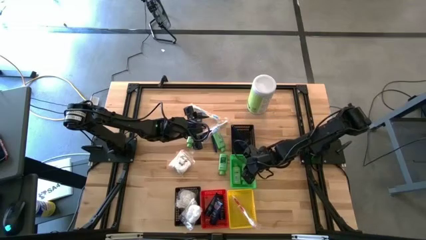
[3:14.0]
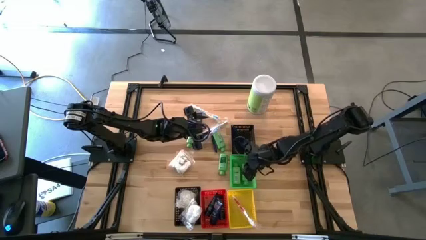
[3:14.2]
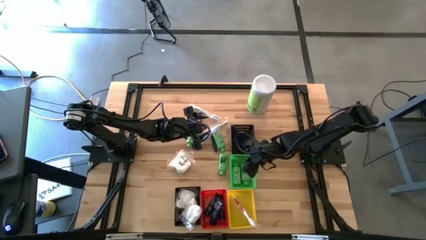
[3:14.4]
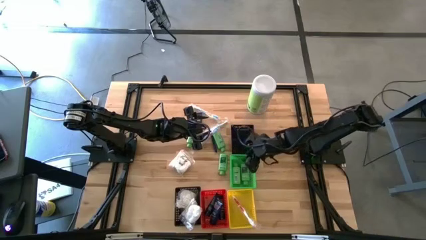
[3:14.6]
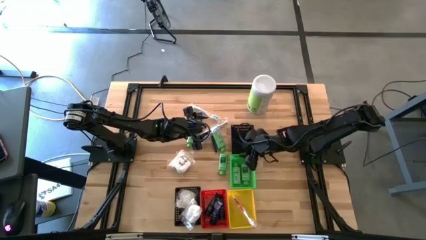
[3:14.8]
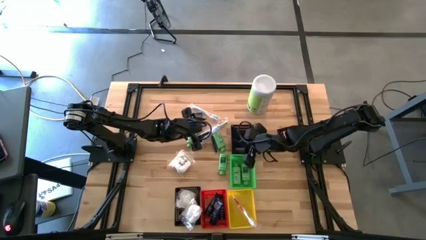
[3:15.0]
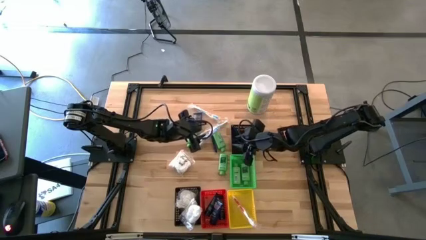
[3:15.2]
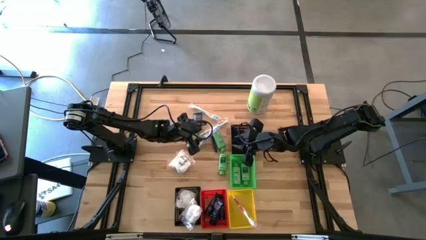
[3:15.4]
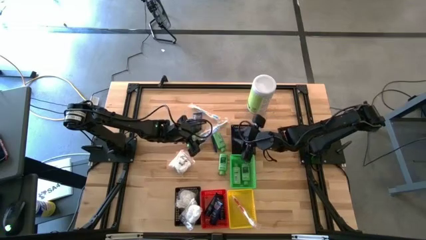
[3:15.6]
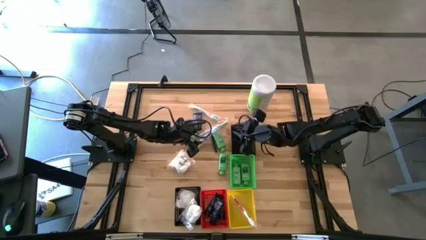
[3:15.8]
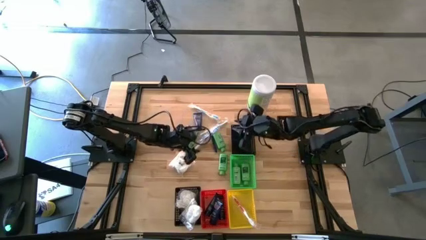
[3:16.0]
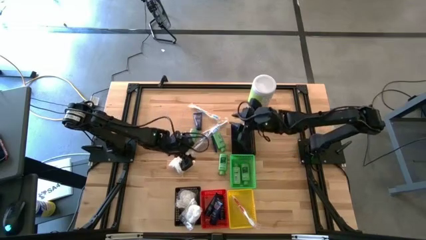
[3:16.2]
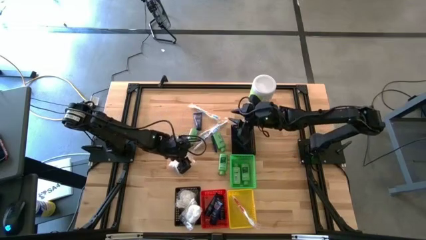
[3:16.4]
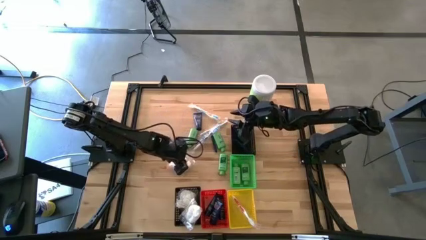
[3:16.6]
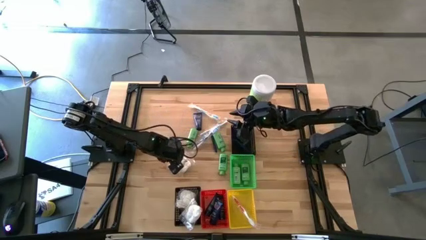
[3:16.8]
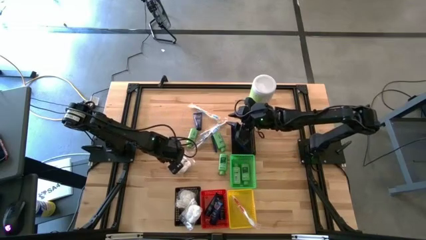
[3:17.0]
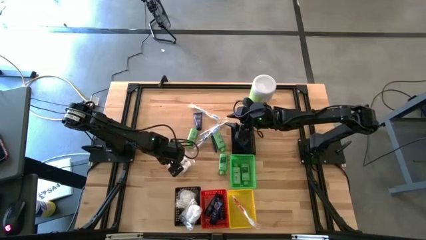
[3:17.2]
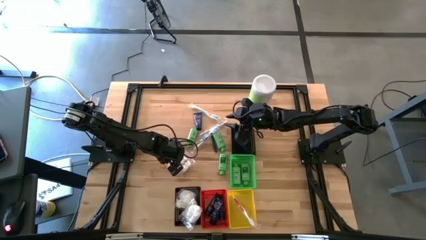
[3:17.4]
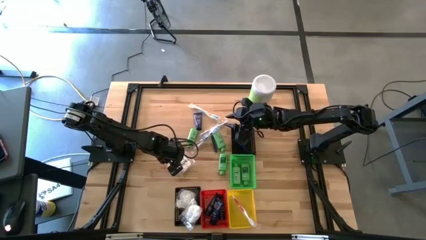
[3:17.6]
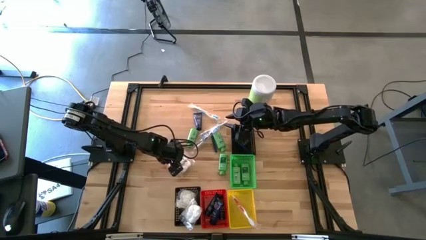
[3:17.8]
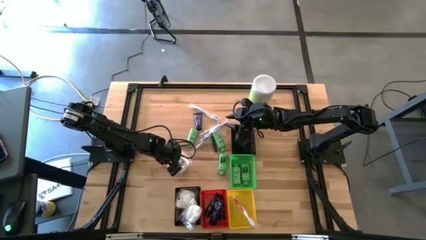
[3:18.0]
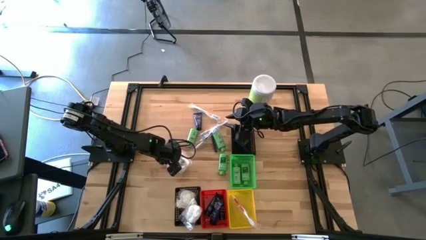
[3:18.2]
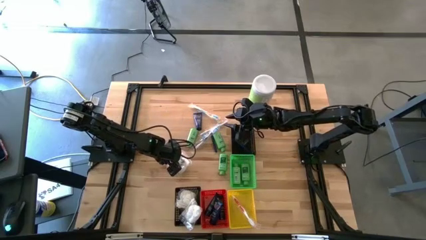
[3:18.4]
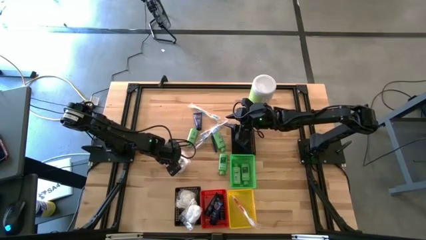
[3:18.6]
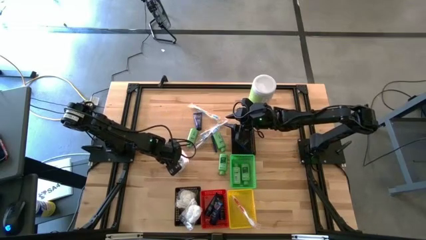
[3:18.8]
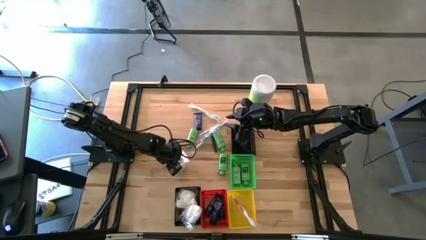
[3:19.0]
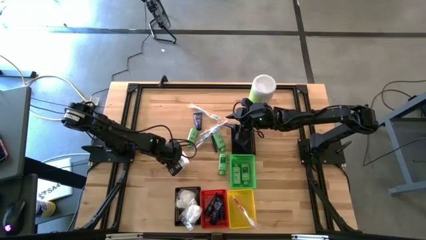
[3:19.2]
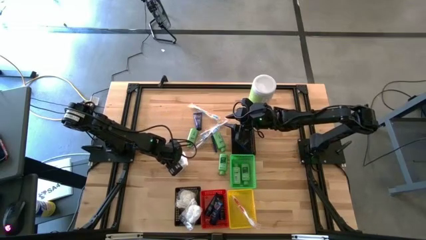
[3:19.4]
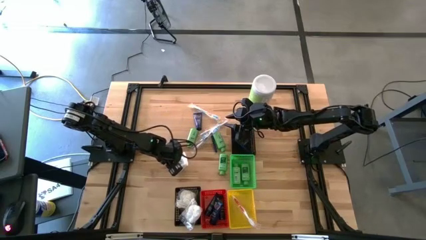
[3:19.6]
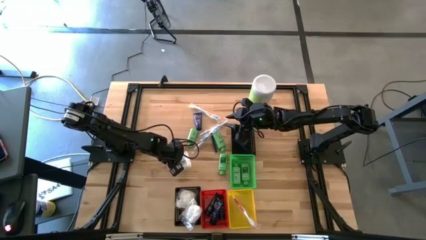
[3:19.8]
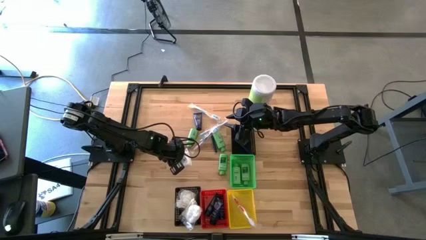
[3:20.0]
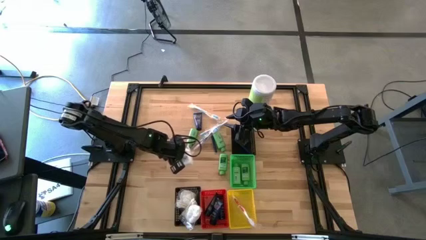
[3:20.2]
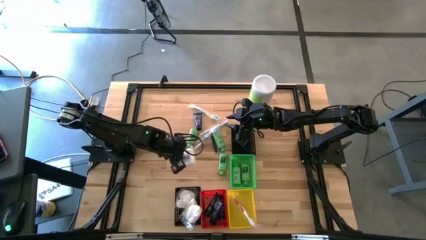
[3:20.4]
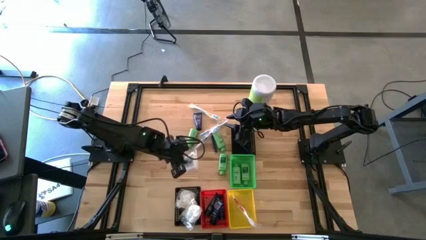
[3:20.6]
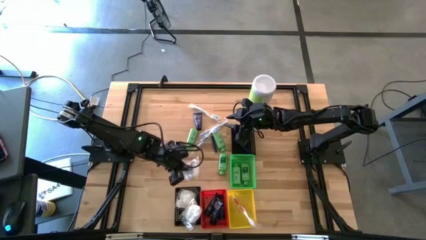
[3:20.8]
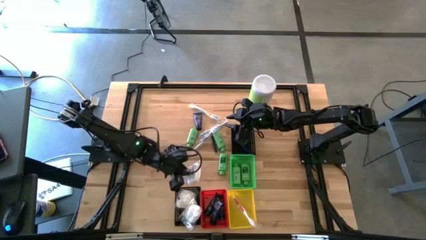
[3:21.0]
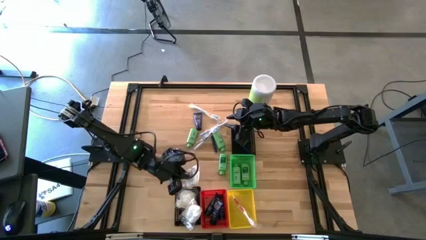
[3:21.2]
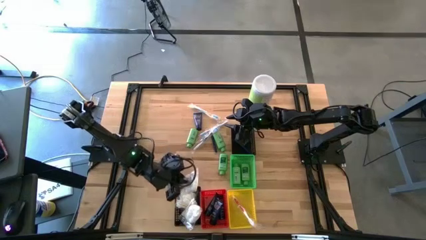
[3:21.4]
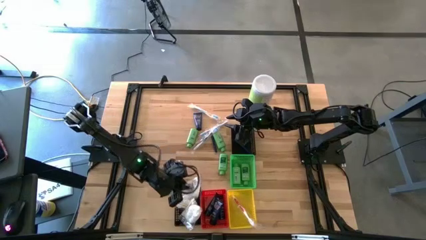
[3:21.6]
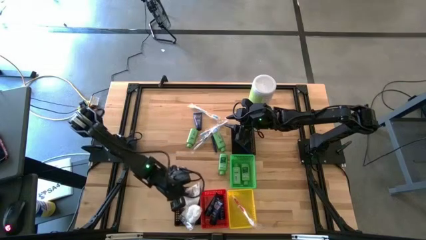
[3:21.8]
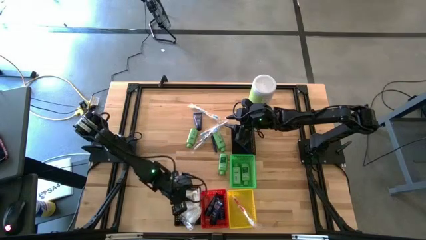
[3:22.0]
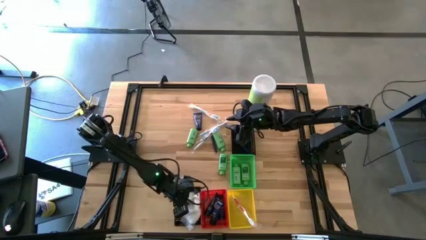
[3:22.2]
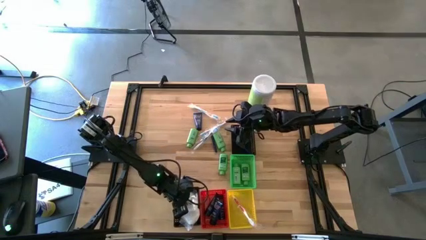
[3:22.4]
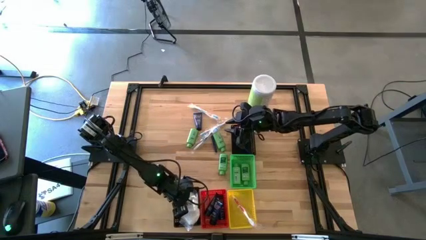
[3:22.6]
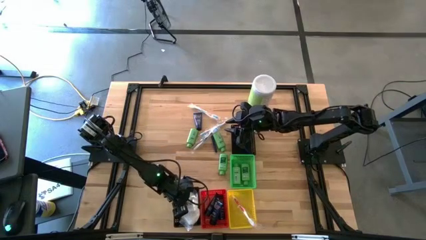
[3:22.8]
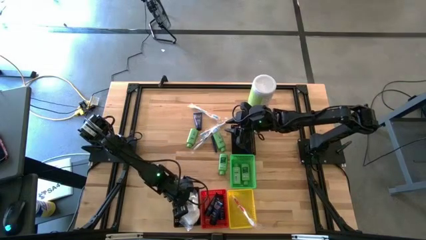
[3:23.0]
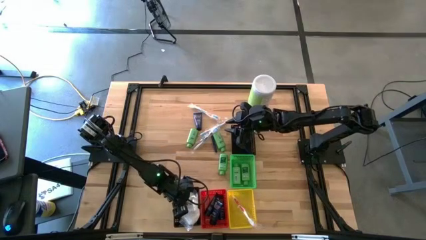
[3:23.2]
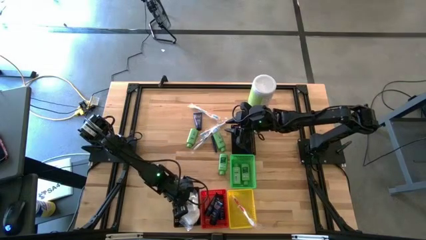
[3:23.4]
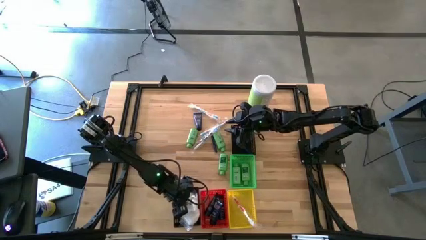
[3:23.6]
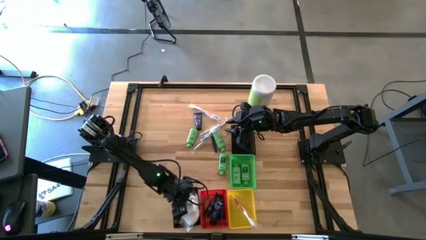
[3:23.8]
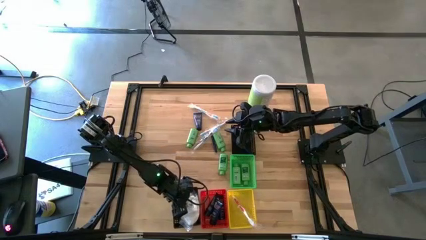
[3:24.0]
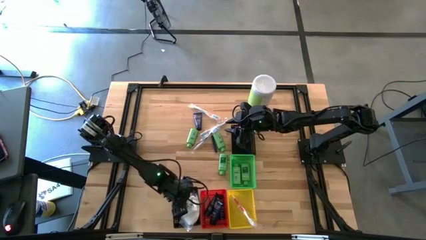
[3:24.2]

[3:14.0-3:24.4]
Task: Pick & Place Travel size toiletries
Put the white cotton pack into the bottom black bin

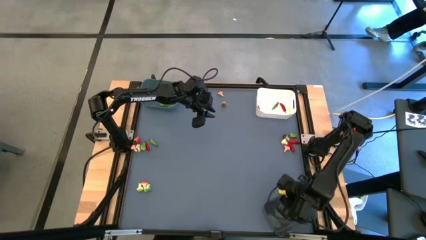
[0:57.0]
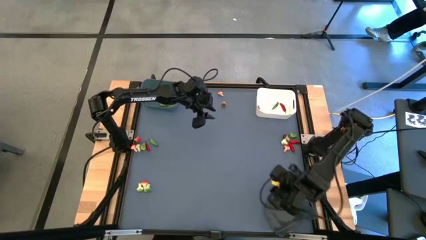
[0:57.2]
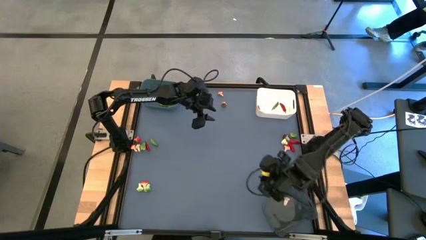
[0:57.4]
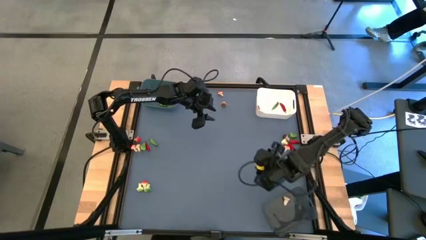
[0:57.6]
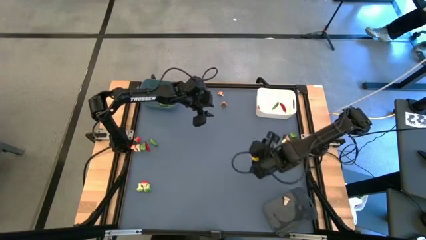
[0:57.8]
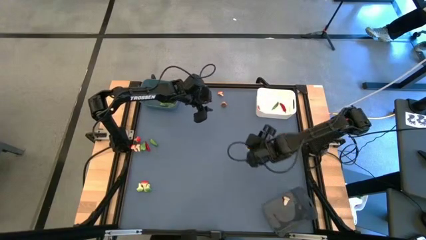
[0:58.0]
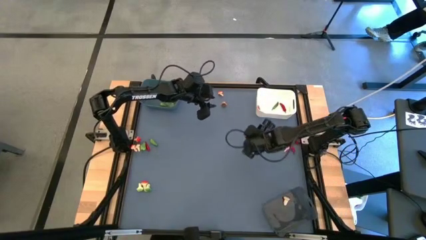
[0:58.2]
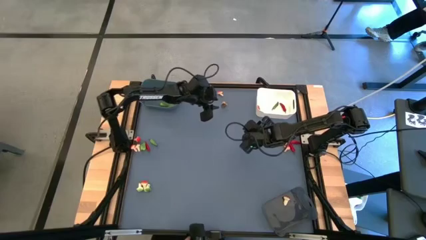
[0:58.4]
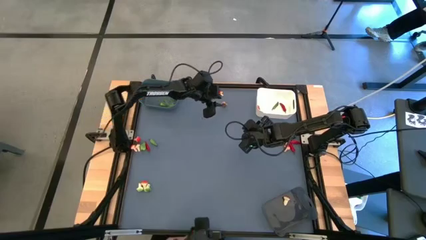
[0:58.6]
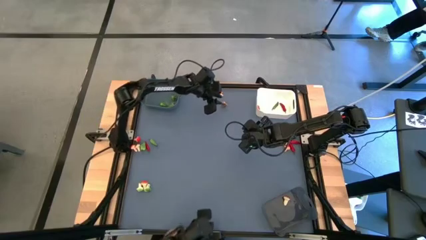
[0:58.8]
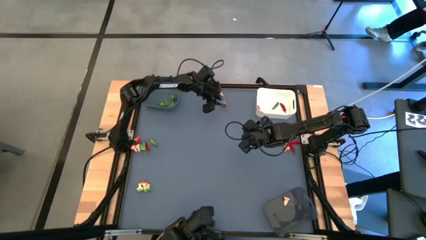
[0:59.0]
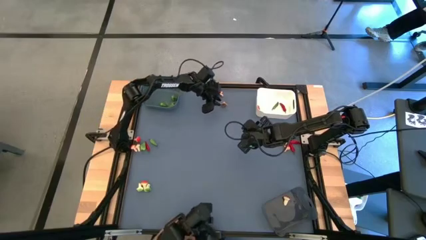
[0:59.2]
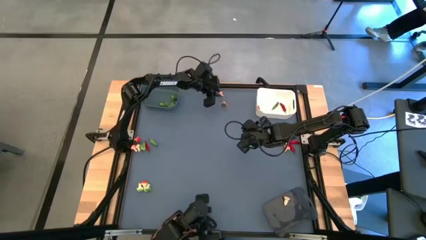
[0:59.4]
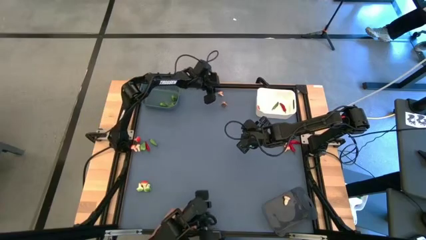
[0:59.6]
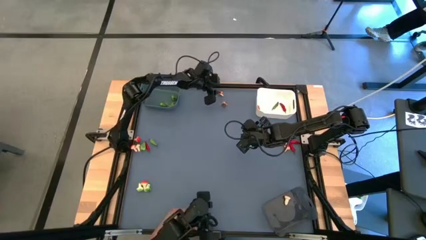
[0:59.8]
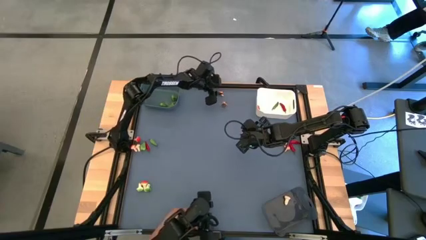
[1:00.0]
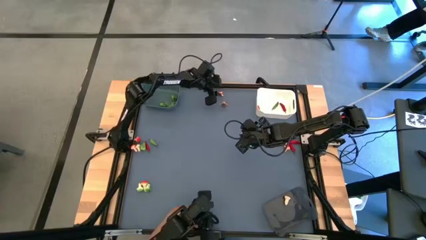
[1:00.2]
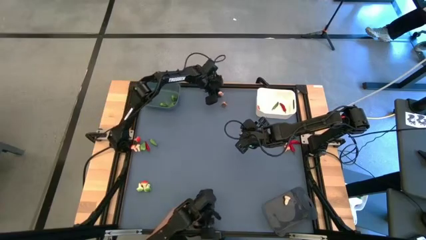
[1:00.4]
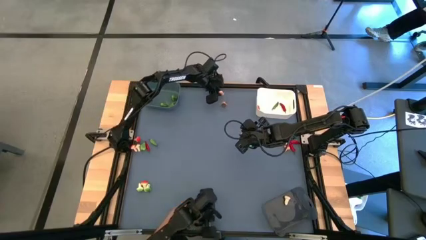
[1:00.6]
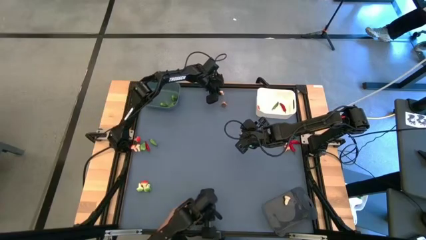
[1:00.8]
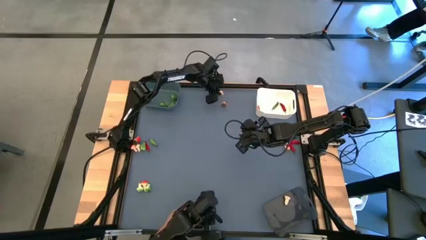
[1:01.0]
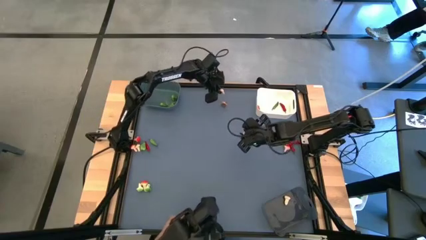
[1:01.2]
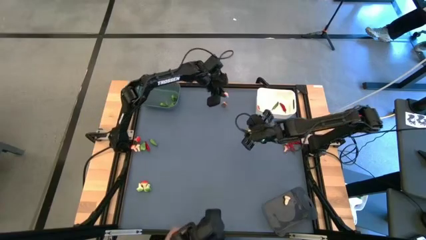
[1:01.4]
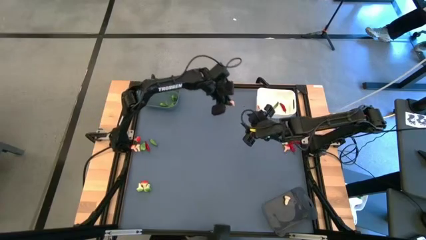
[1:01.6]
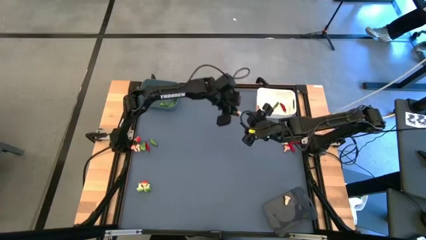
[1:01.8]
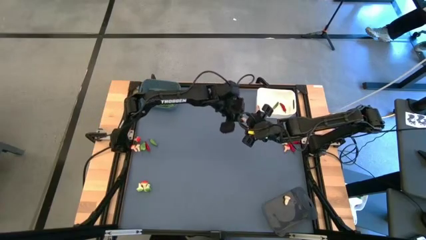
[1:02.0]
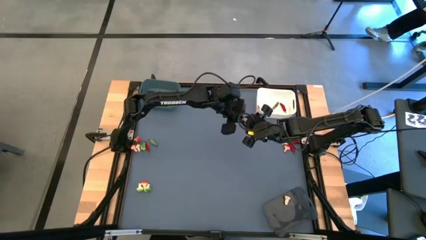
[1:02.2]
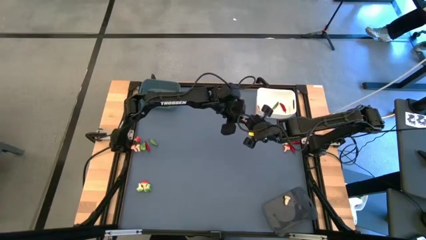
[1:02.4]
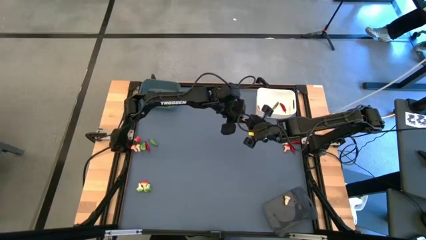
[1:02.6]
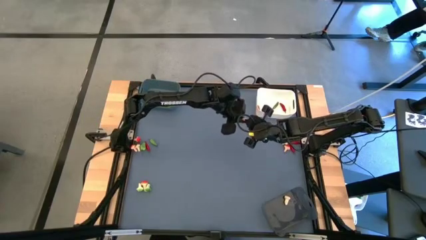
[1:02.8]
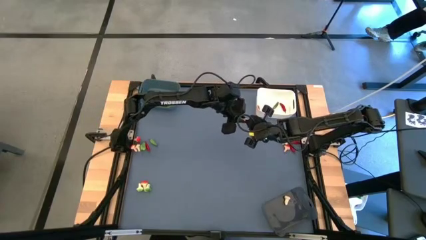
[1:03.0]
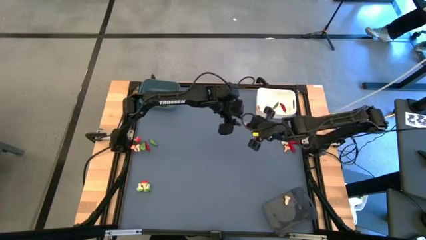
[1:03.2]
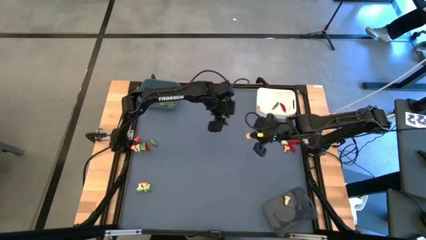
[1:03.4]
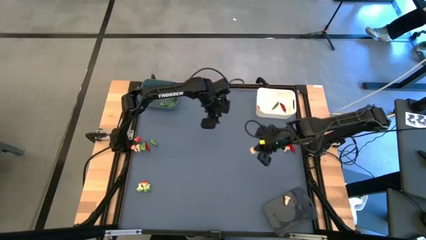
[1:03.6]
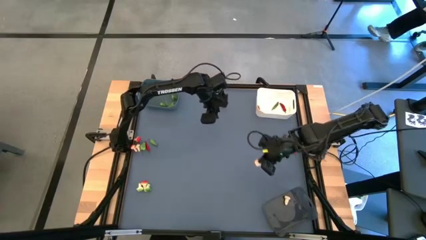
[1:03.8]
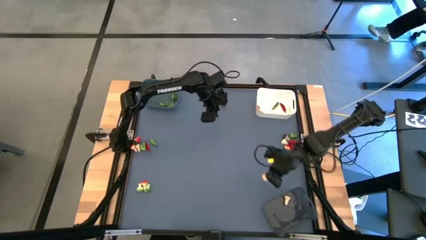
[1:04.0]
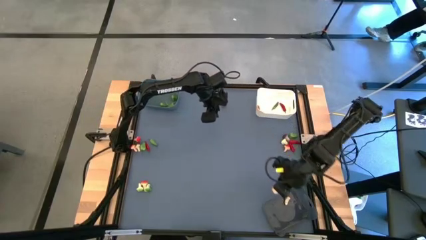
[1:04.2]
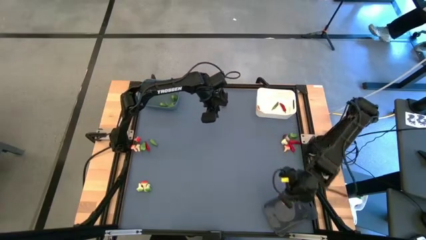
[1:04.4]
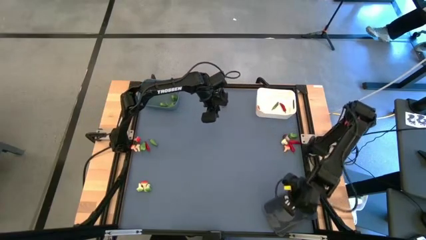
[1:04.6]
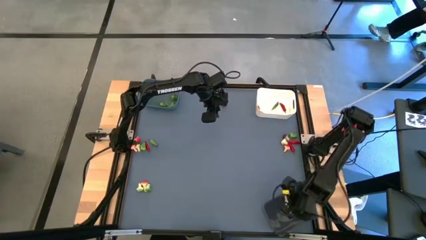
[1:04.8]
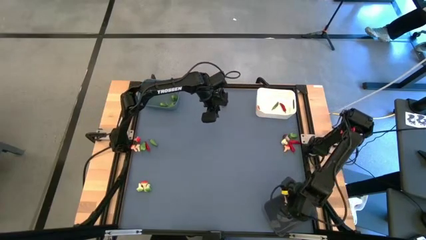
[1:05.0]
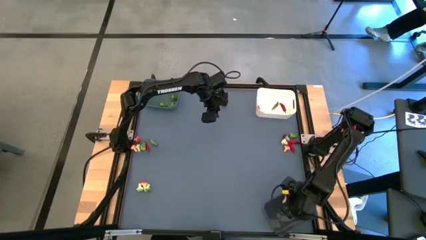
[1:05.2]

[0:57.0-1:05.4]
Task: Sort produce into baskets
Put the brown mushroom into the black bin
